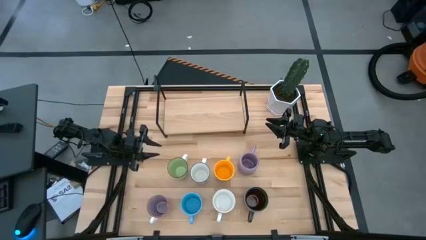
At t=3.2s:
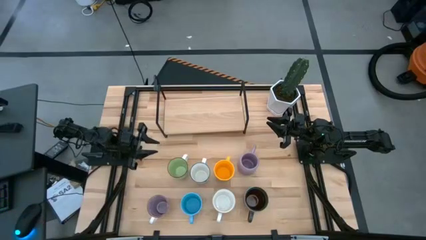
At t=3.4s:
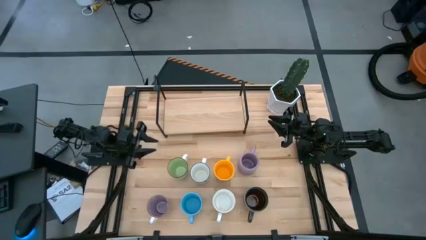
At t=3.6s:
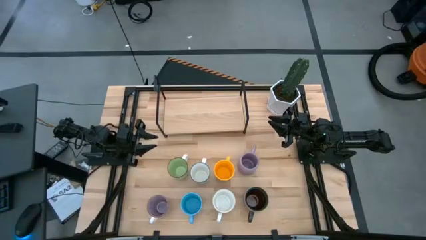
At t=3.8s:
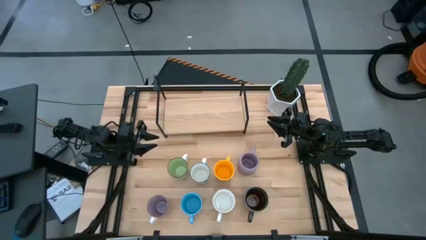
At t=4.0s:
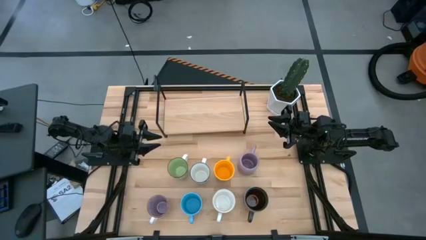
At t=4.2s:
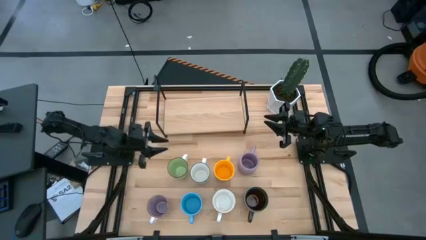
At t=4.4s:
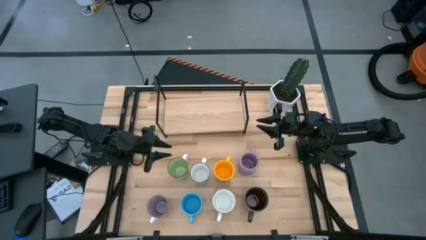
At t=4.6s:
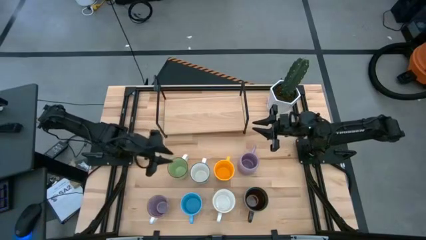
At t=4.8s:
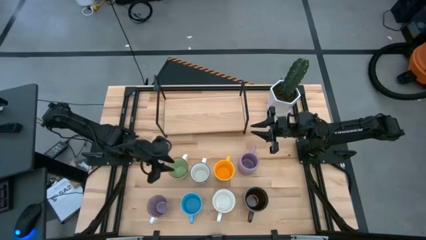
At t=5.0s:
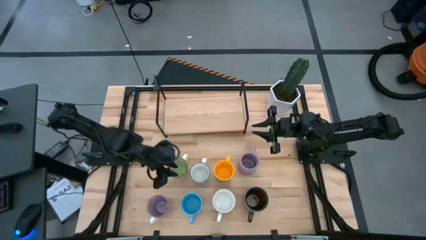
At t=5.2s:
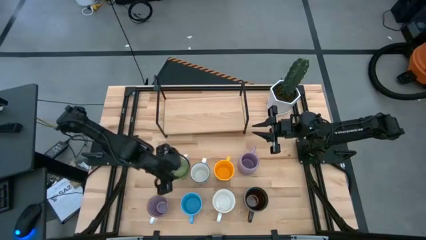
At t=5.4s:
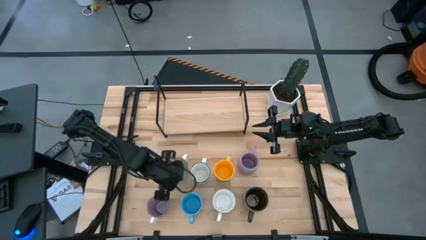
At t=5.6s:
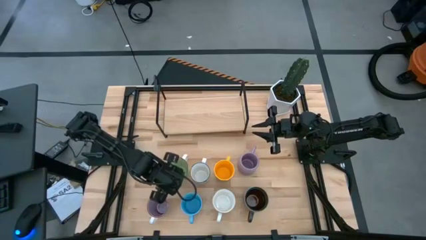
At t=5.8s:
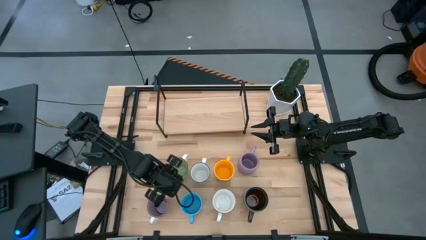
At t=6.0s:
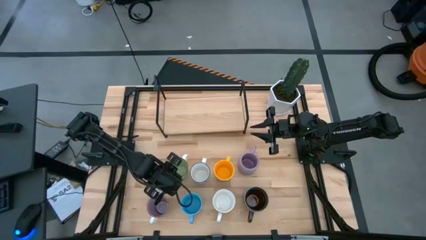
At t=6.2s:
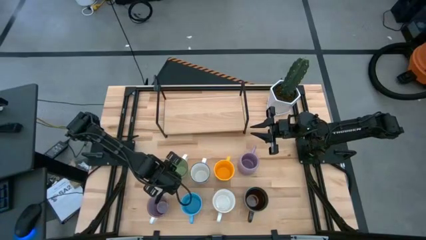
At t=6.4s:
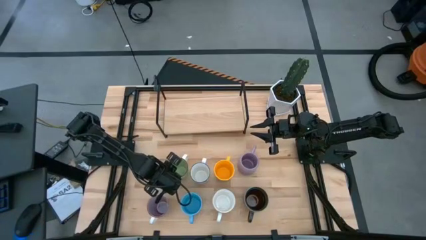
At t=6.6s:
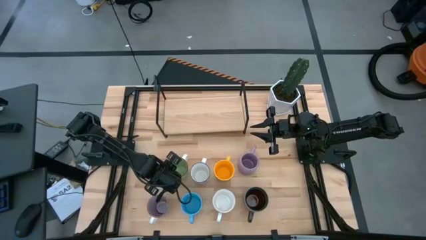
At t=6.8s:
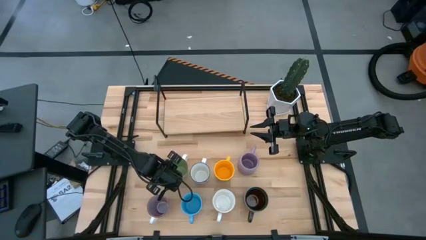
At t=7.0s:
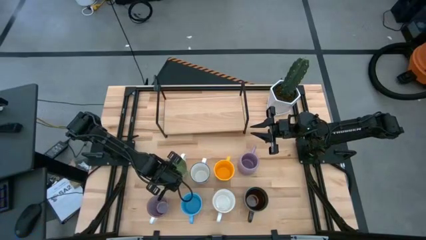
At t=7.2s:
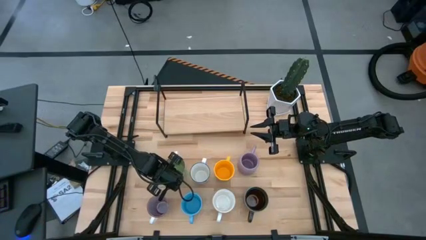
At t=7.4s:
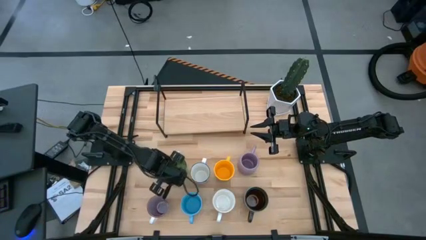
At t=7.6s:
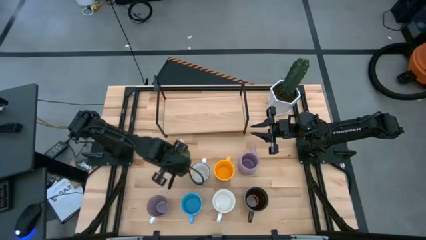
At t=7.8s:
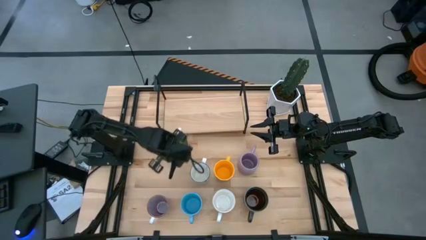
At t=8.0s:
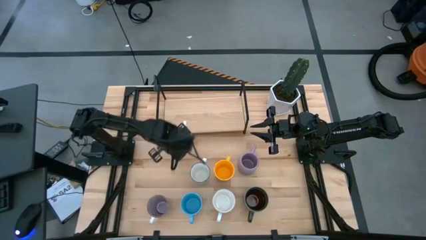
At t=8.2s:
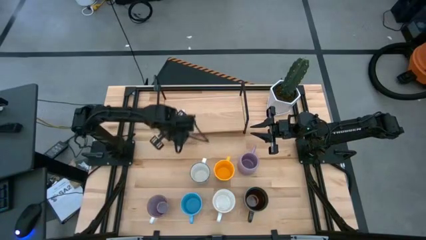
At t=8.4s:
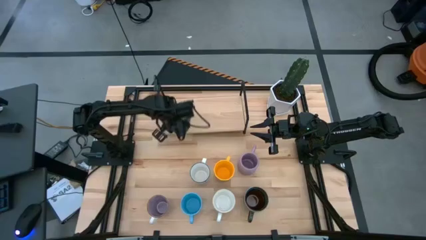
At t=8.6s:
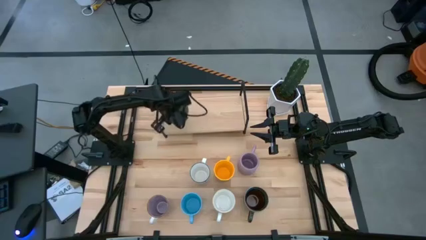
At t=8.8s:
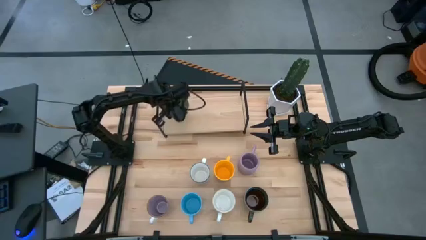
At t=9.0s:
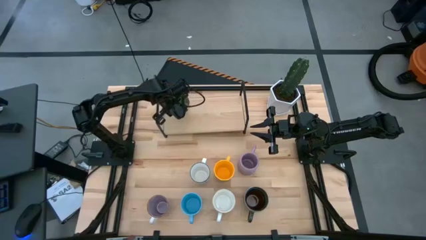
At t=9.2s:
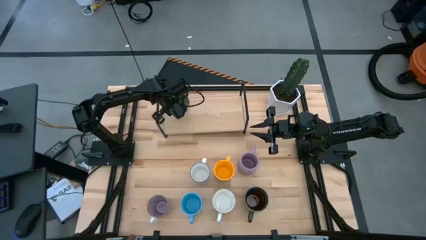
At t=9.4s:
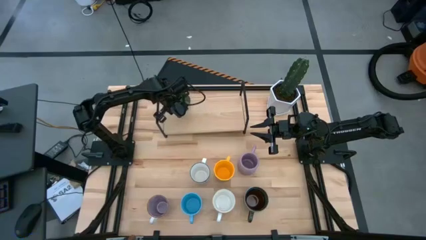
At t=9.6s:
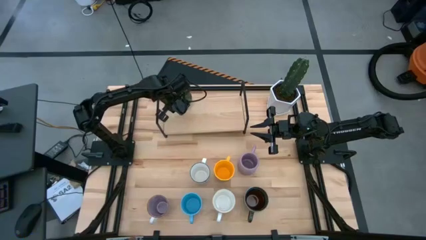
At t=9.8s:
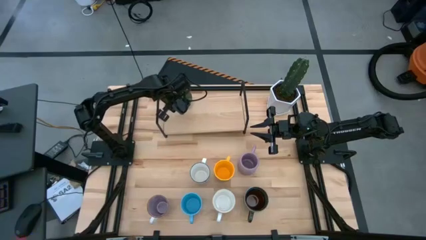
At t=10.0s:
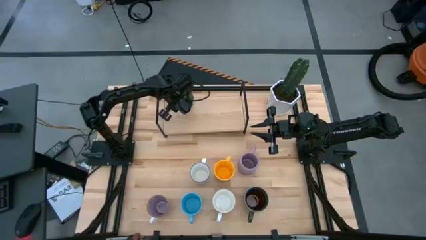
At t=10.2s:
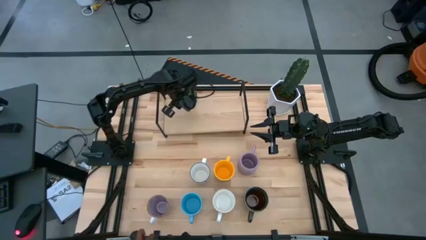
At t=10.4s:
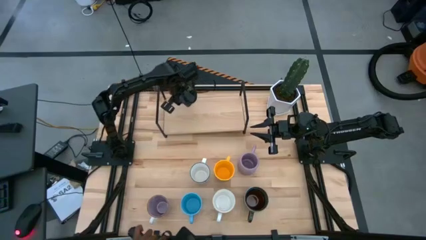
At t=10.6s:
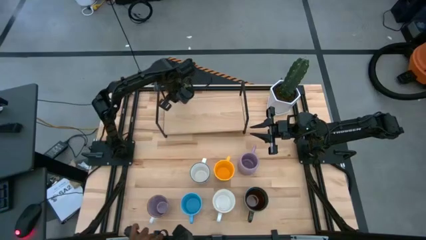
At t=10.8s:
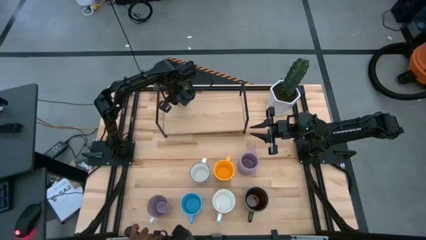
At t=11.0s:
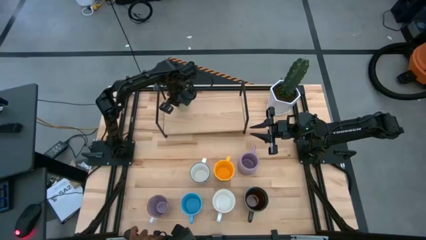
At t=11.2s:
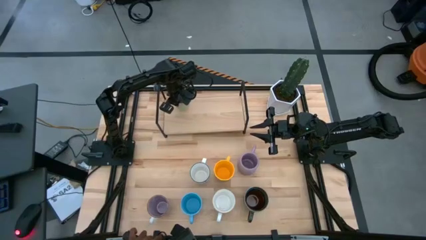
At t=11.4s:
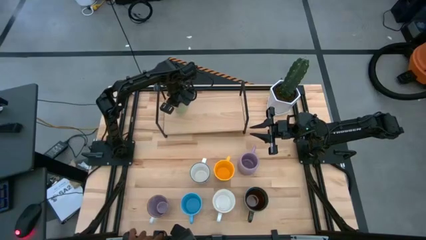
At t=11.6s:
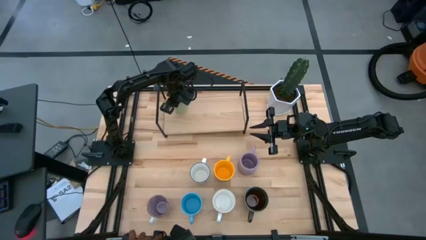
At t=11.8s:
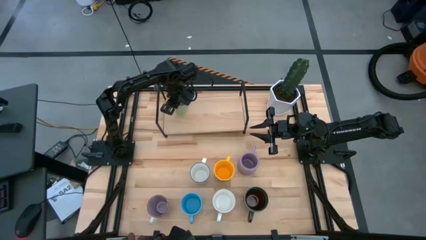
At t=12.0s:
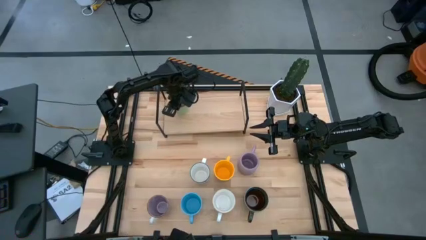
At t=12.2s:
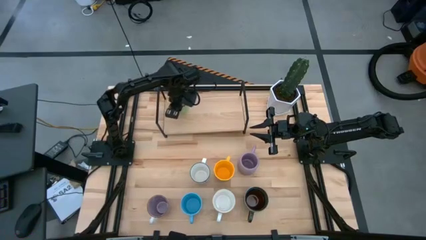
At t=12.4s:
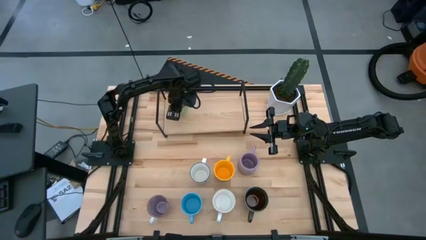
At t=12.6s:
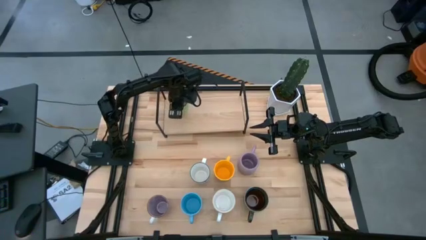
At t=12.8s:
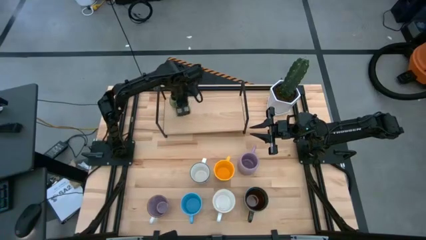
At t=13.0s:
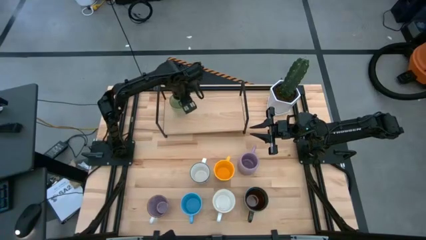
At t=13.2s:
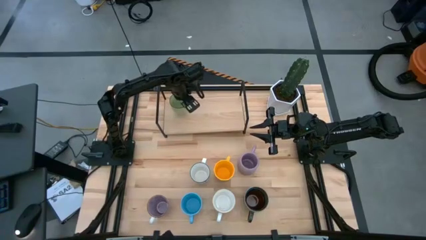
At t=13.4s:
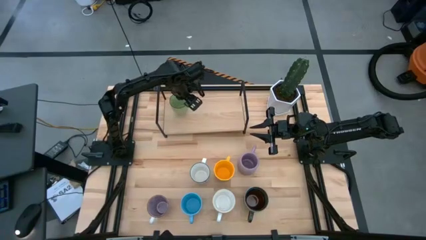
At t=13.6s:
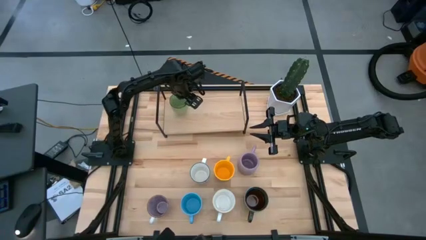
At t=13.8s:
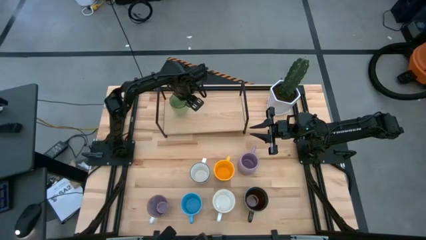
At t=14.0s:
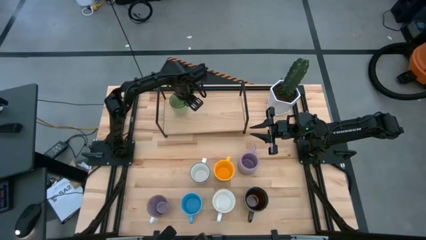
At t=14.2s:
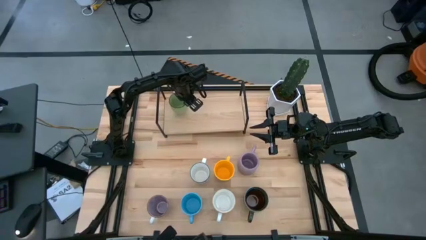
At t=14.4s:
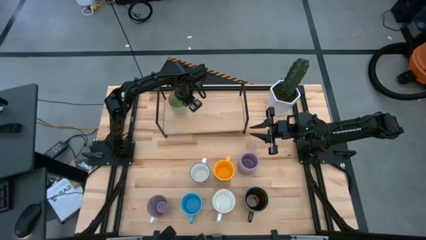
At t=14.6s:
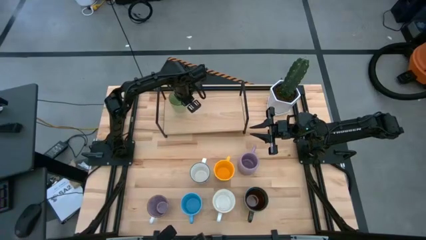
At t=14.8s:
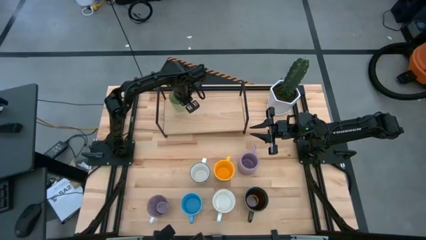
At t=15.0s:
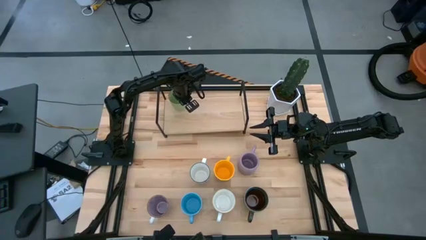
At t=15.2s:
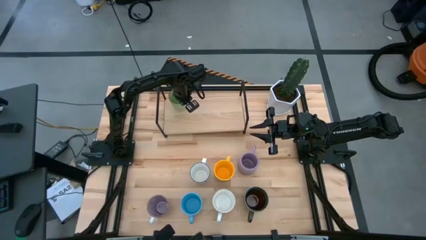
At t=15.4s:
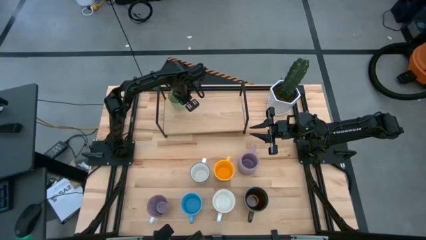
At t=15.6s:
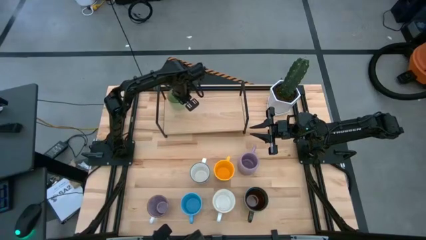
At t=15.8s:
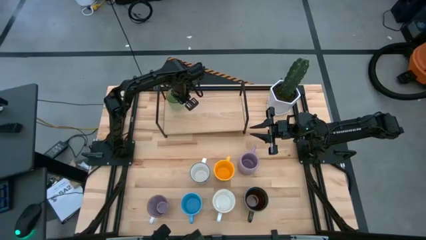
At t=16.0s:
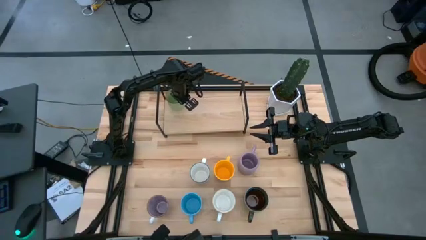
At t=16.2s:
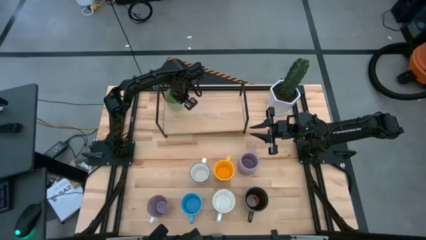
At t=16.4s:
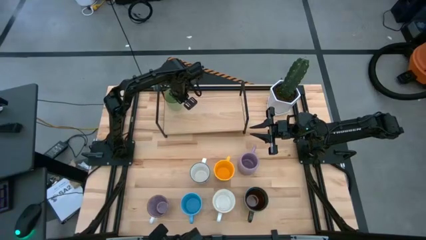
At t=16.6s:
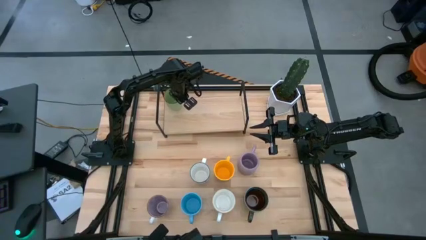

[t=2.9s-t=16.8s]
Task: Place coffee mugs
Put the light green mug on the shelf
